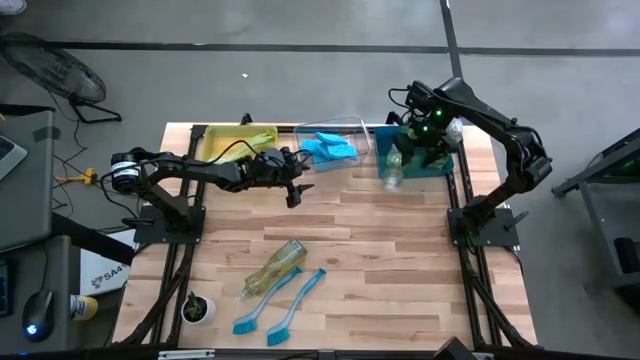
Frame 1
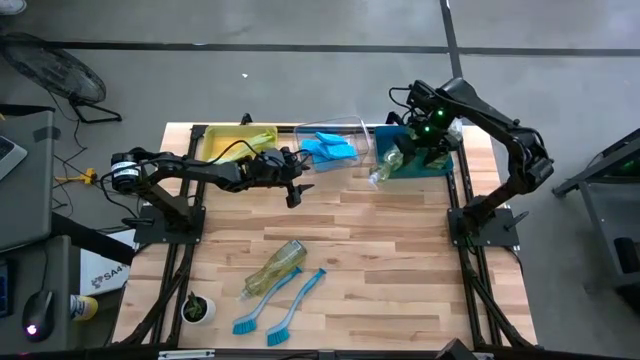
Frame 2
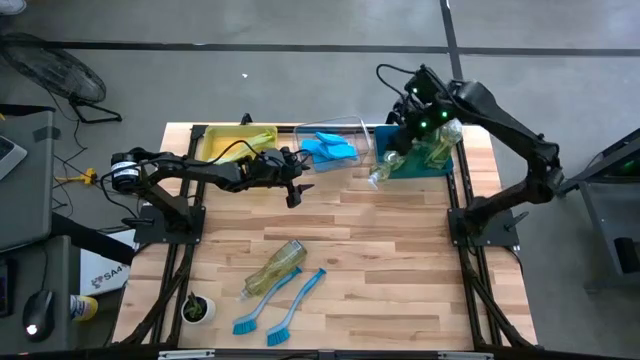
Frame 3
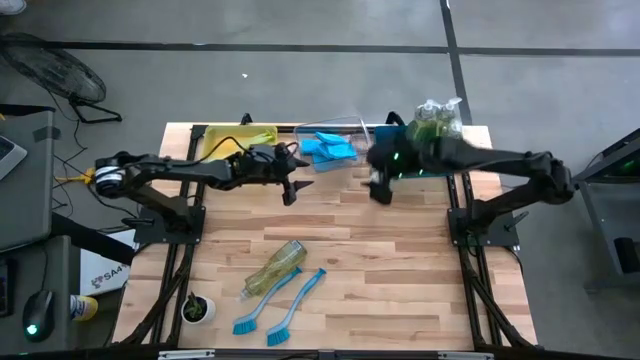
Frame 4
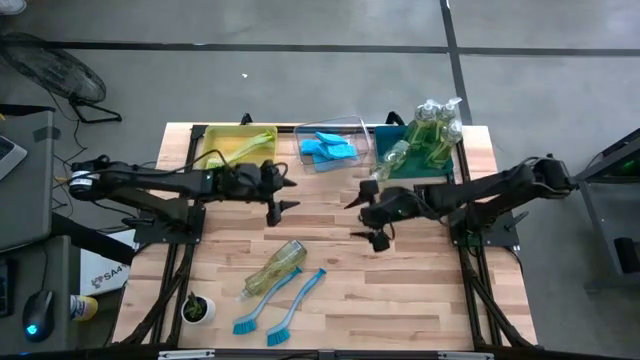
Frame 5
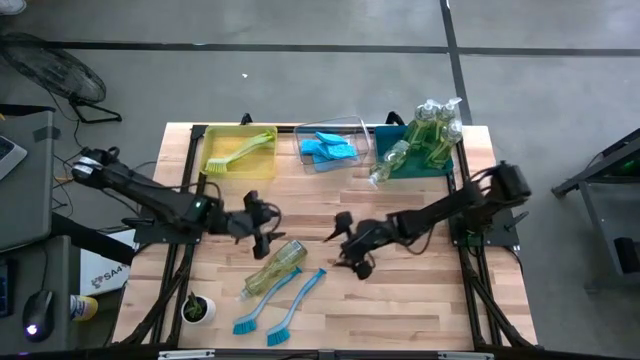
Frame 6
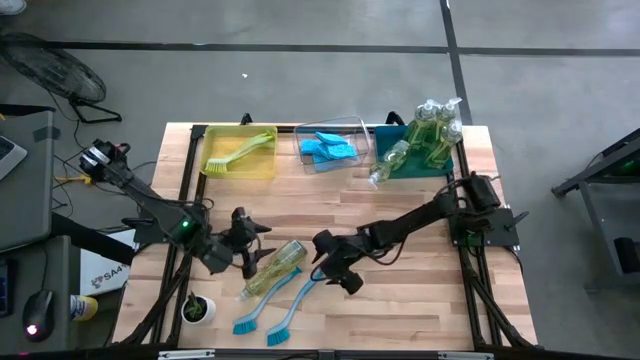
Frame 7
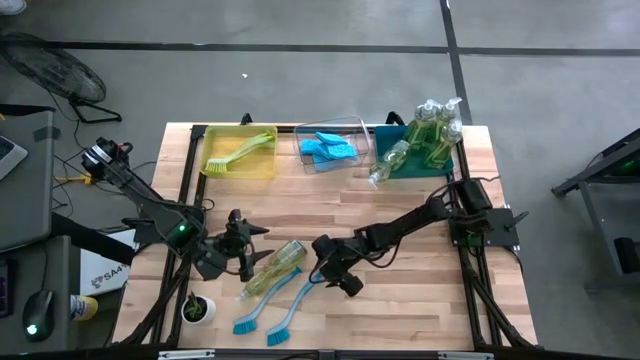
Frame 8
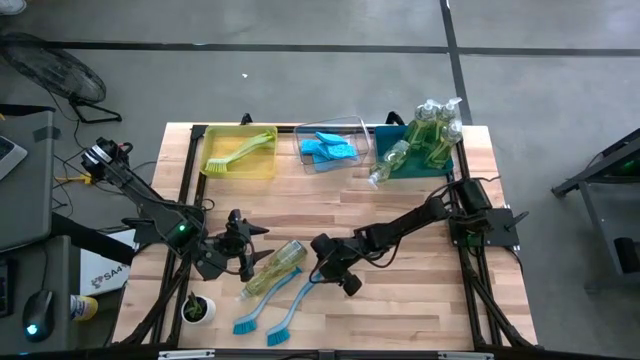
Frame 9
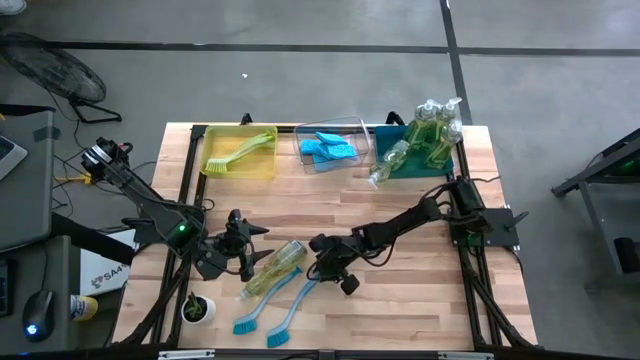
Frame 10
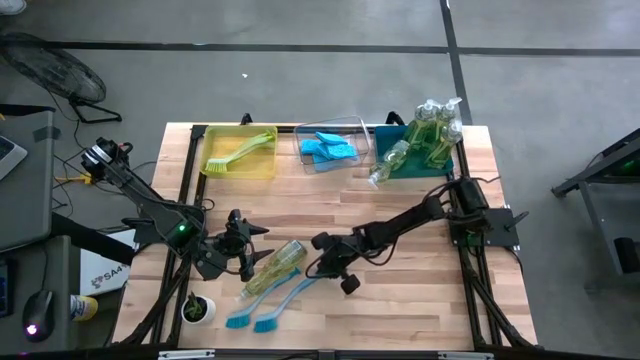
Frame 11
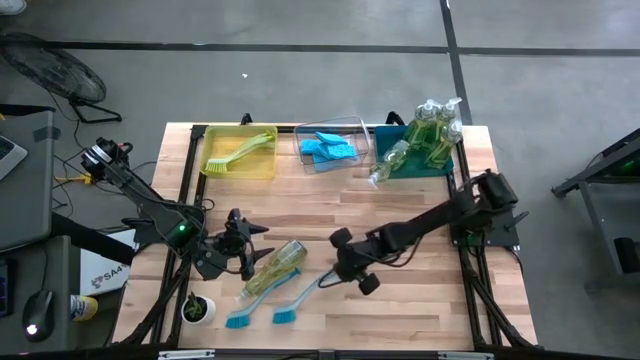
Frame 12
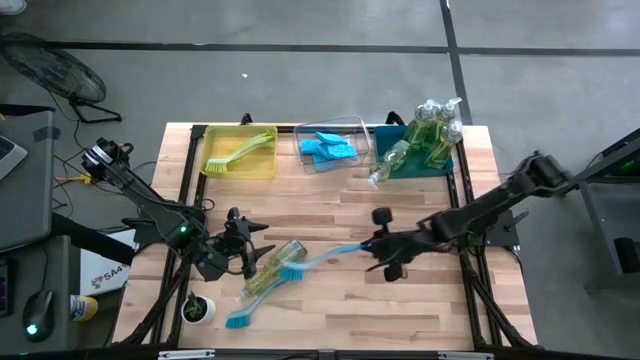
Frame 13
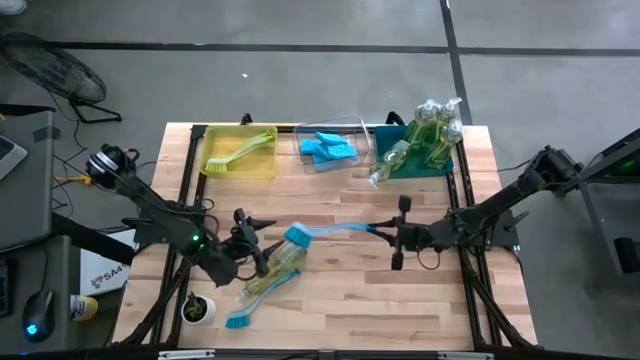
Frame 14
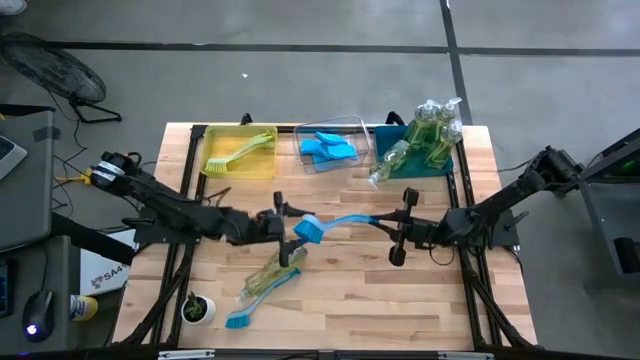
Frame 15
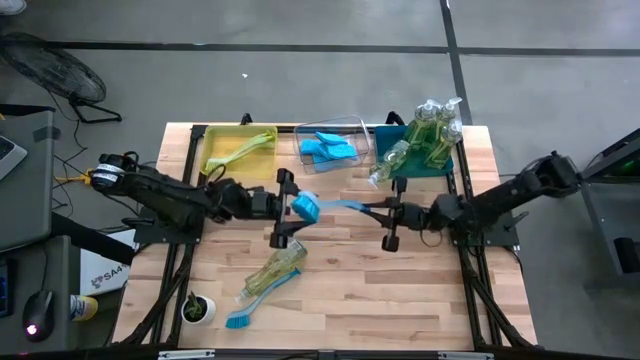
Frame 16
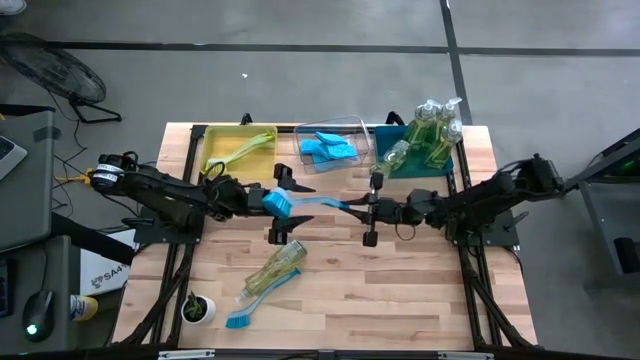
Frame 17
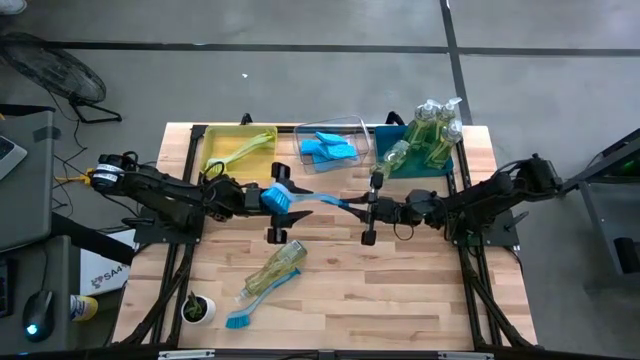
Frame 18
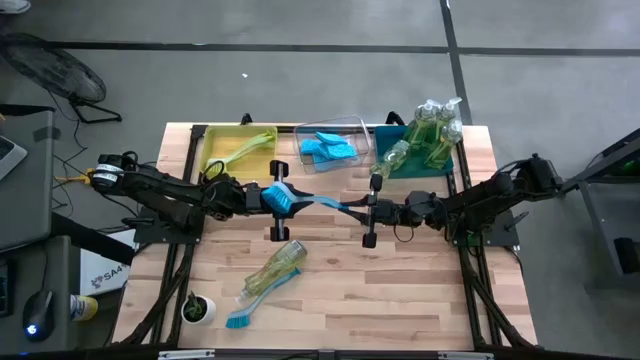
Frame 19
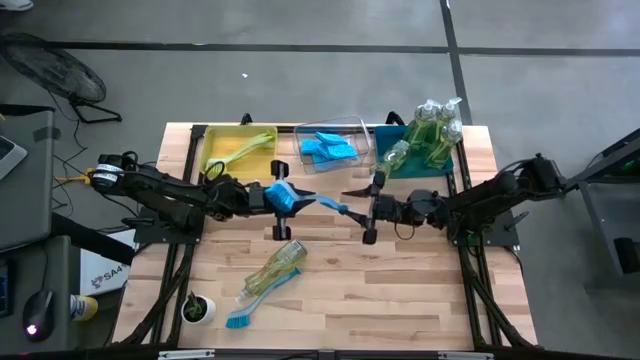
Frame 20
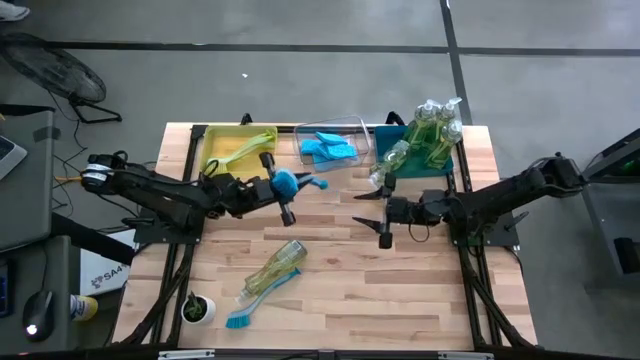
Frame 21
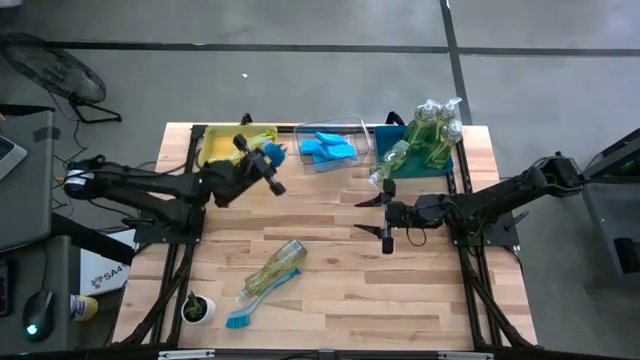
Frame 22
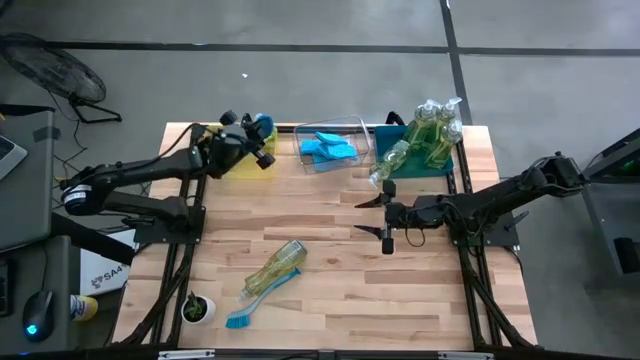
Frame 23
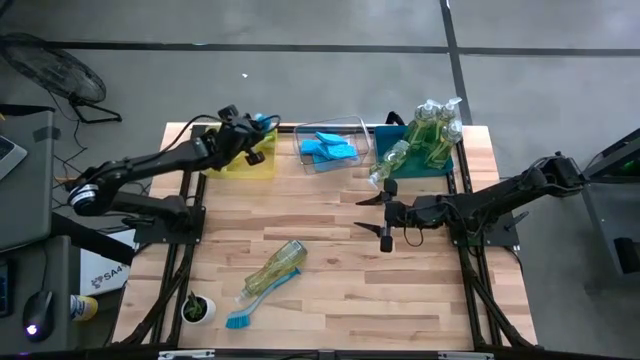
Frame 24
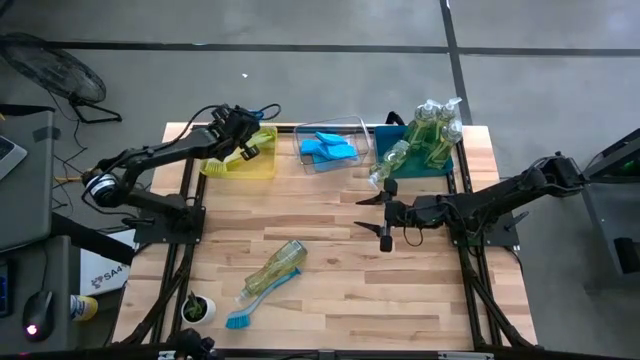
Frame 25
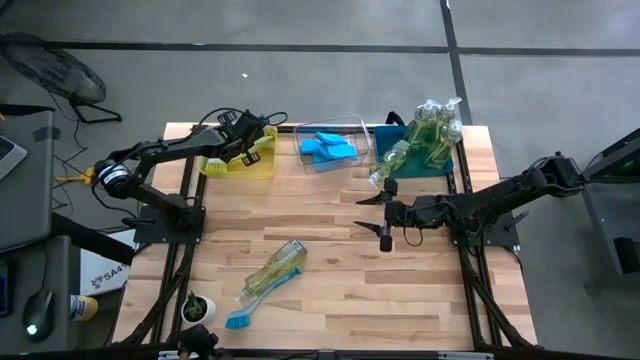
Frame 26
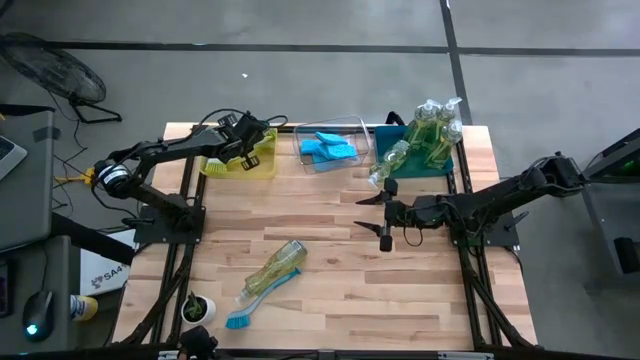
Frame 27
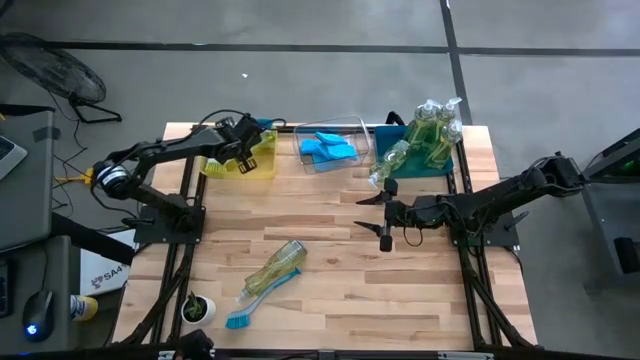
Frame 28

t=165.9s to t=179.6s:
Task: Pick & Place Kitchen Sink Supplies
Put the right blue dish brush into the yellow bin

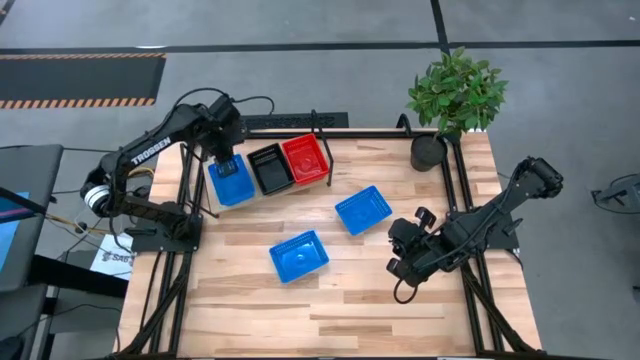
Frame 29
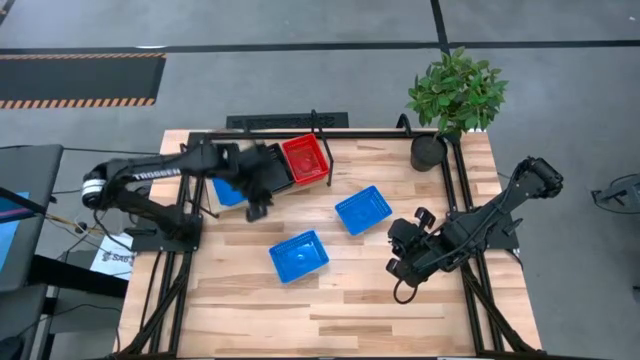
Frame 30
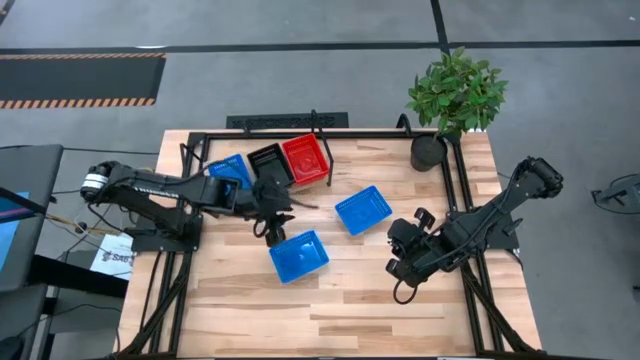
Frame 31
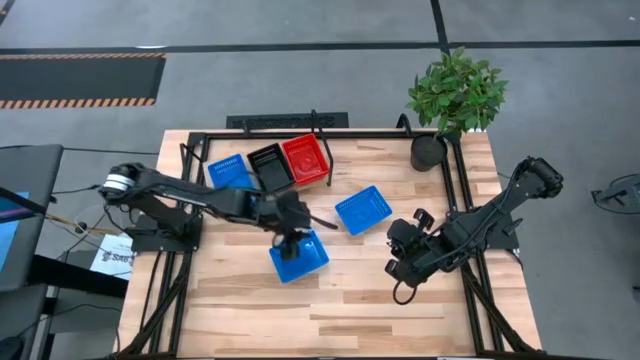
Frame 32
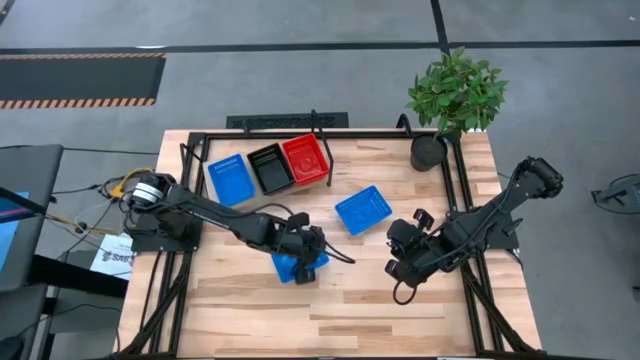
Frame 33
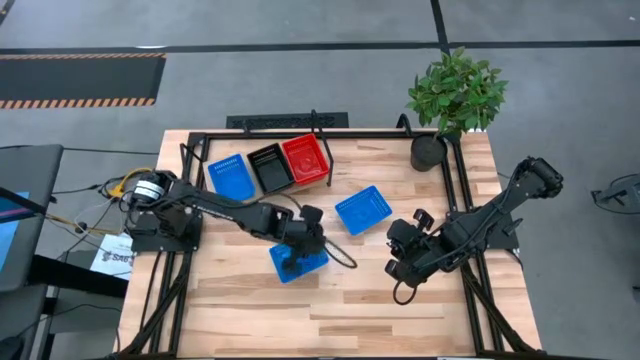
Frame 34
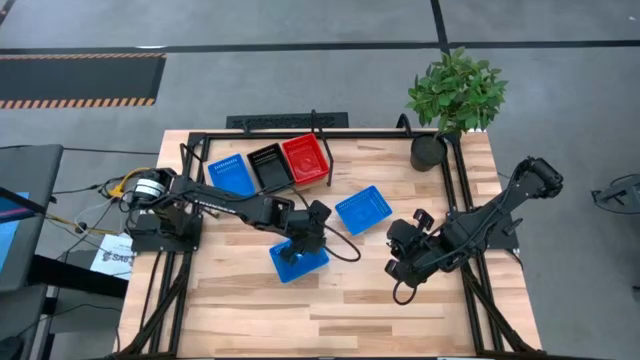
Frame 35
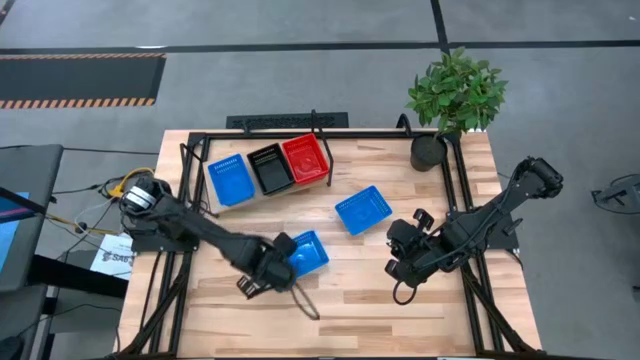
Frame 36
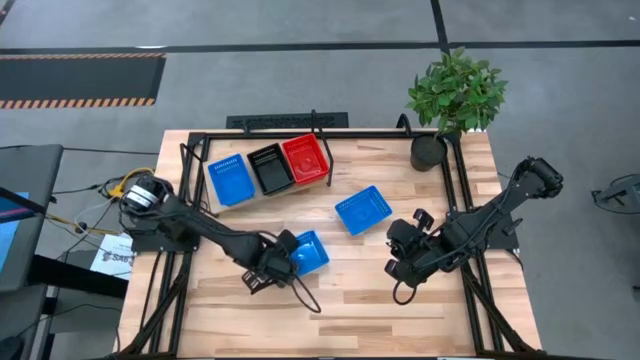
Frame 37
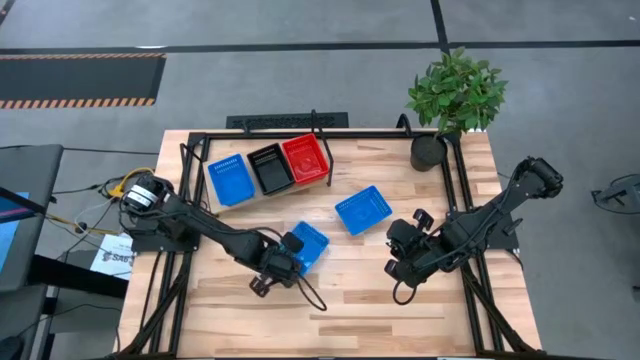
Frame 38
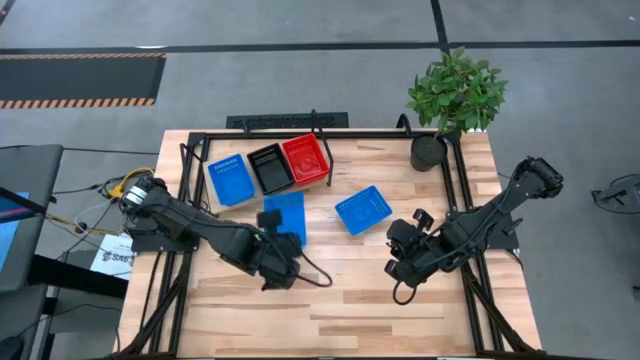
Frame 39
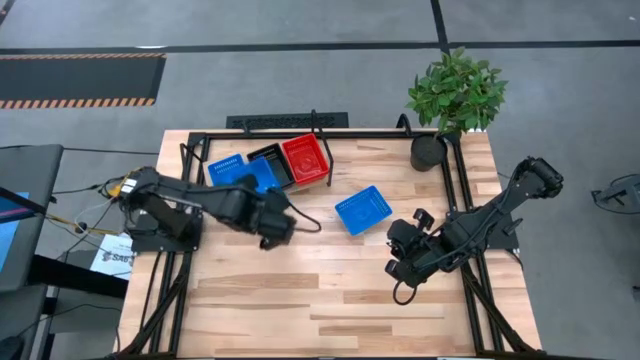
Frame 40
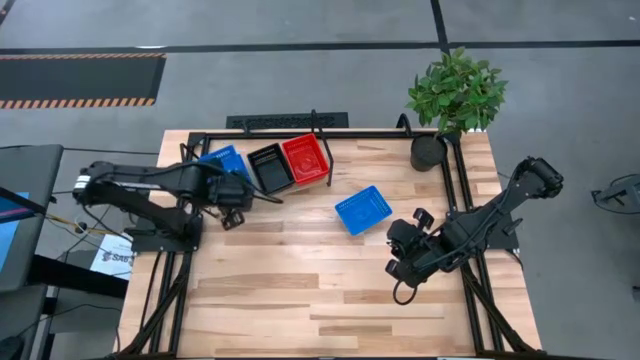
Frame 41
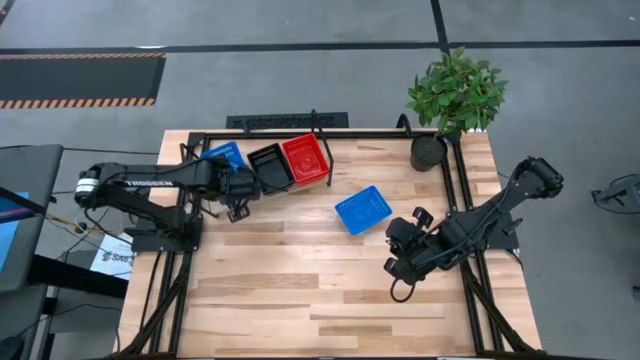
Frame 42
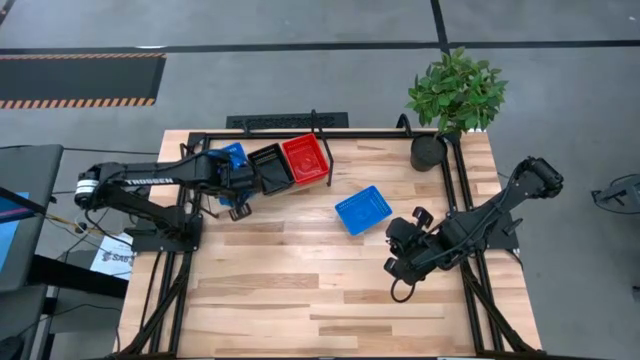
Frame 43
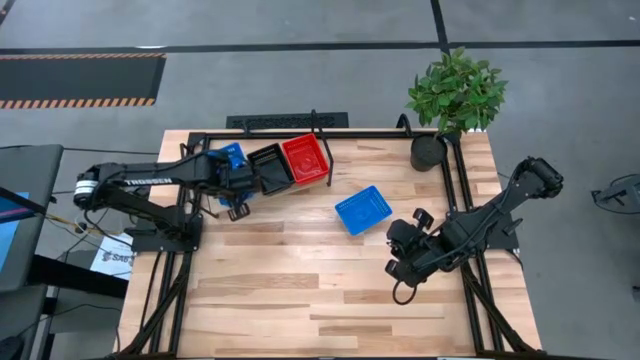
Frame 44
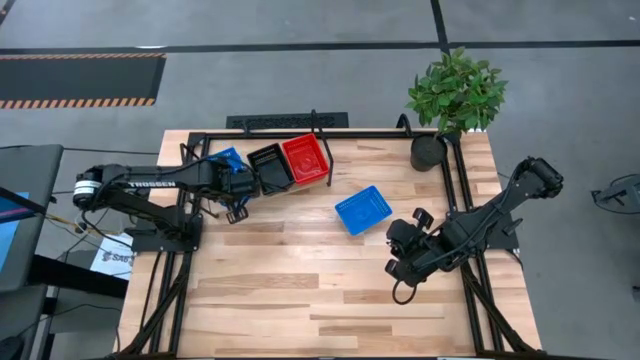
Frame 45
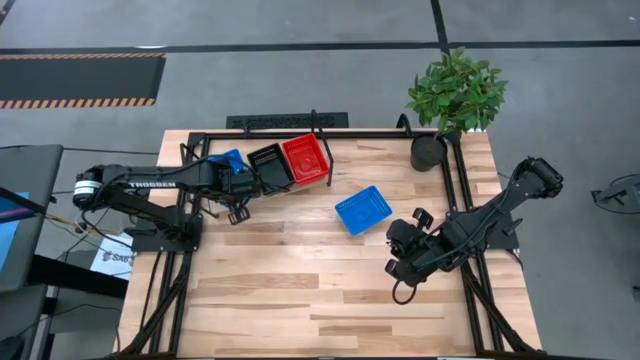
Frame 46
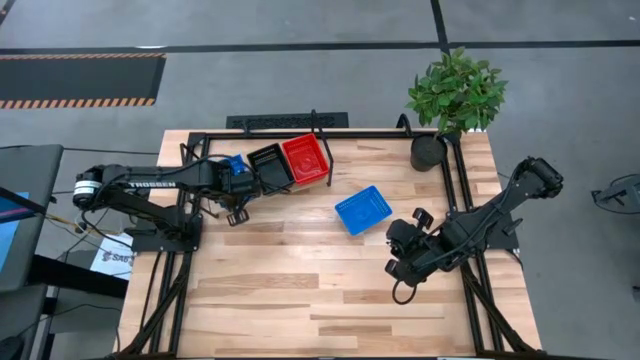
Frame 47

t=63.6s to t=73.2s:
Task: Stack baskets on shelf by color
Stack the left blue bin on top of the blue bin on the shelf
